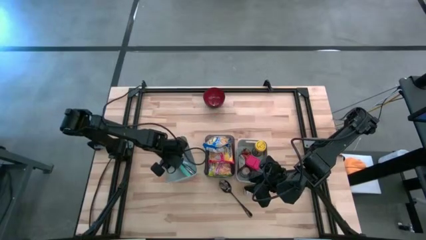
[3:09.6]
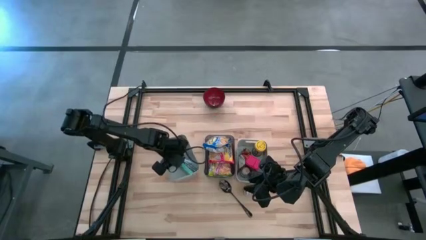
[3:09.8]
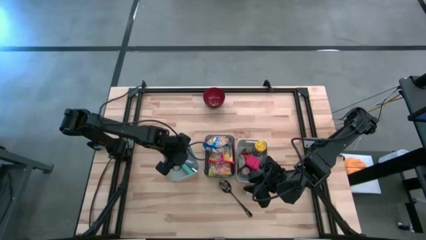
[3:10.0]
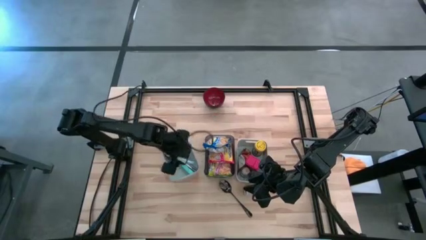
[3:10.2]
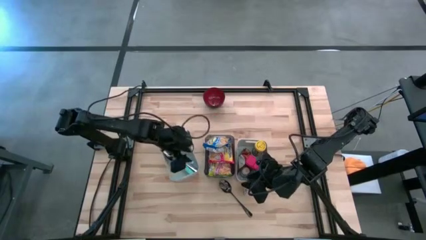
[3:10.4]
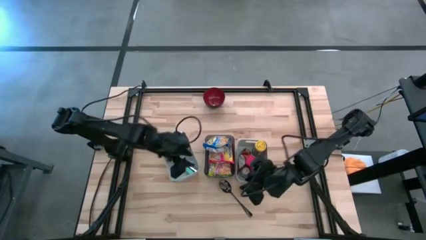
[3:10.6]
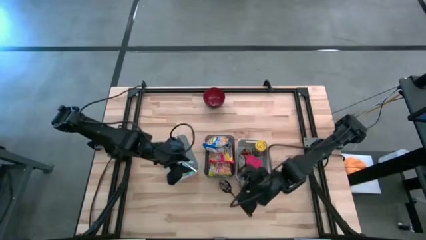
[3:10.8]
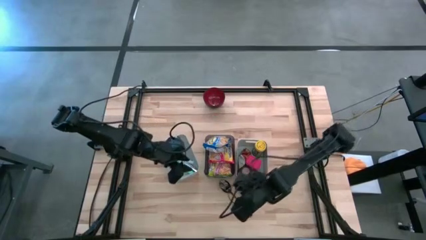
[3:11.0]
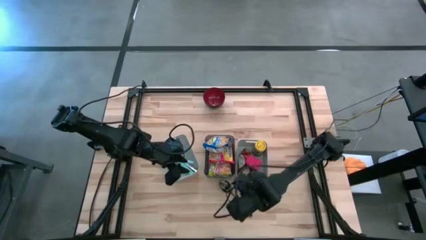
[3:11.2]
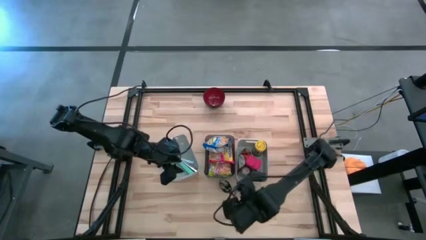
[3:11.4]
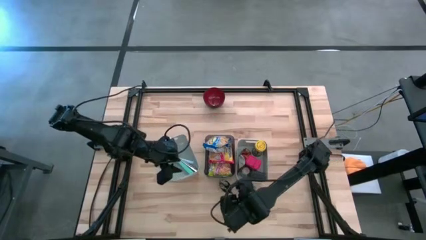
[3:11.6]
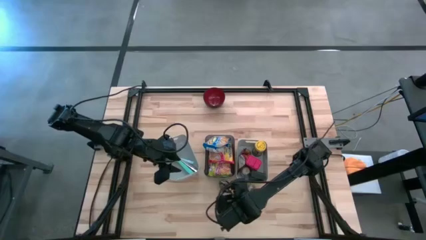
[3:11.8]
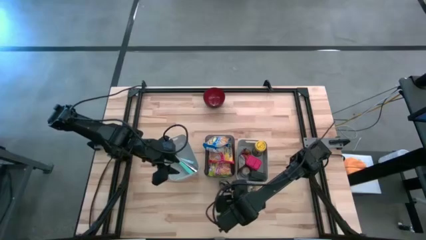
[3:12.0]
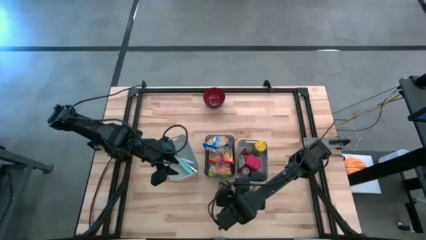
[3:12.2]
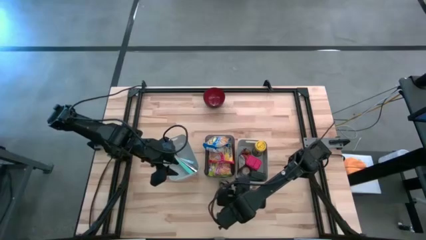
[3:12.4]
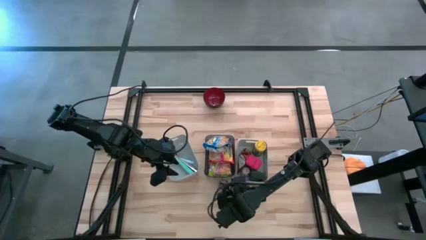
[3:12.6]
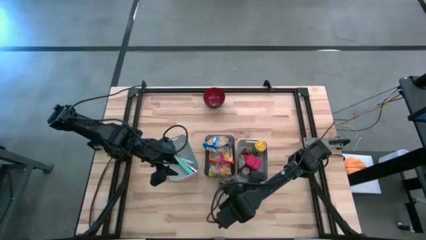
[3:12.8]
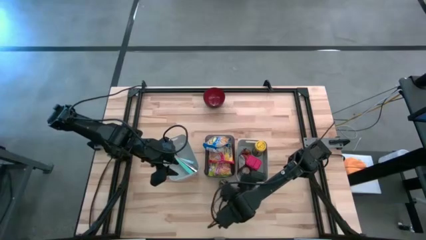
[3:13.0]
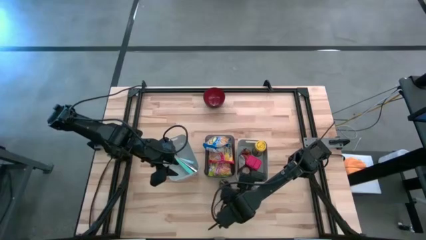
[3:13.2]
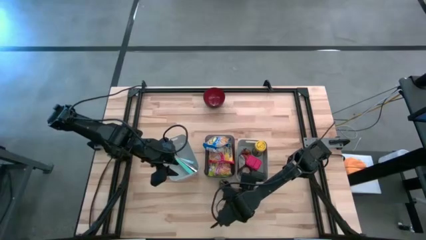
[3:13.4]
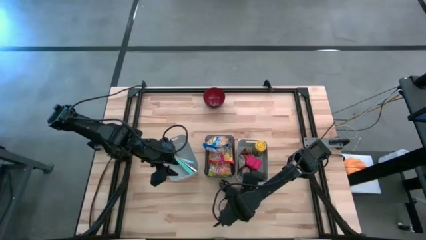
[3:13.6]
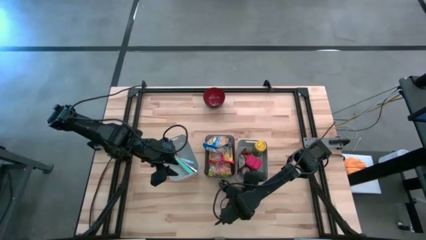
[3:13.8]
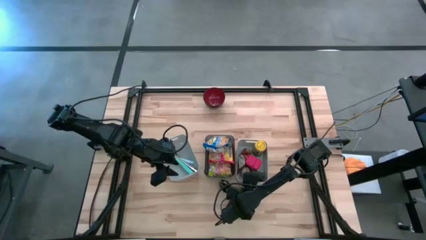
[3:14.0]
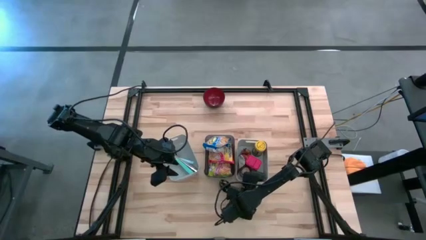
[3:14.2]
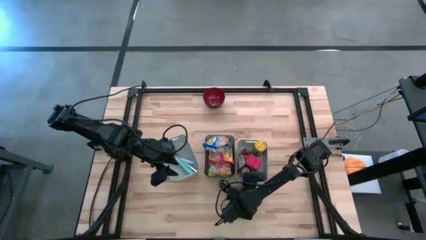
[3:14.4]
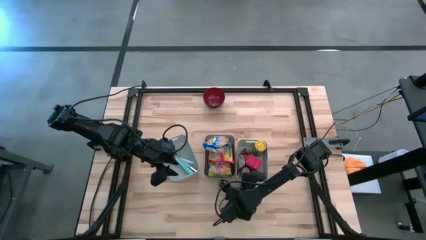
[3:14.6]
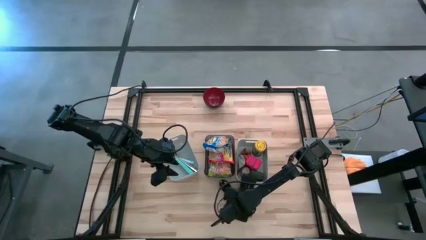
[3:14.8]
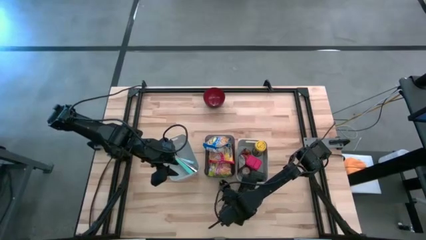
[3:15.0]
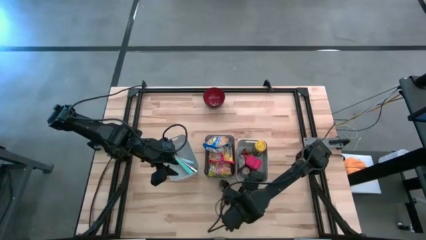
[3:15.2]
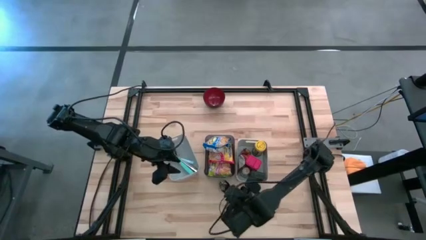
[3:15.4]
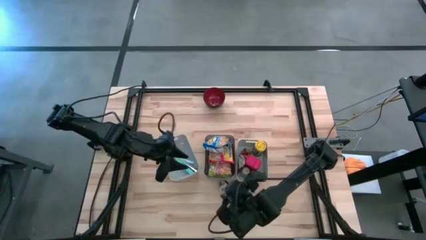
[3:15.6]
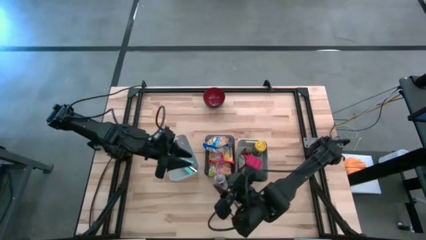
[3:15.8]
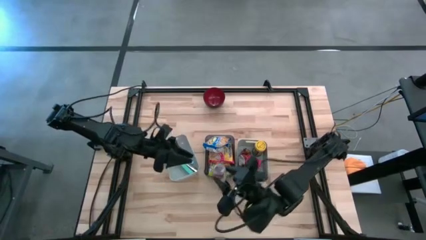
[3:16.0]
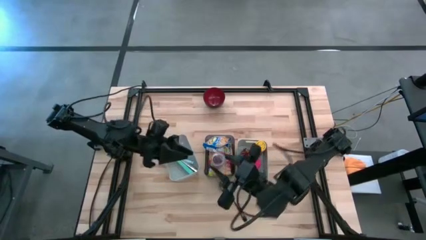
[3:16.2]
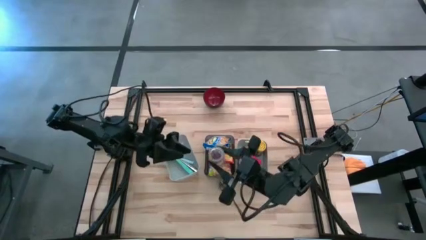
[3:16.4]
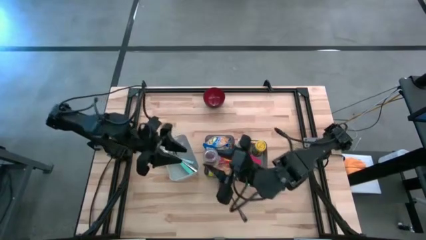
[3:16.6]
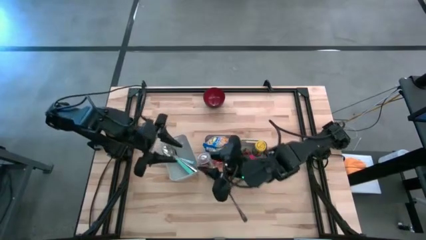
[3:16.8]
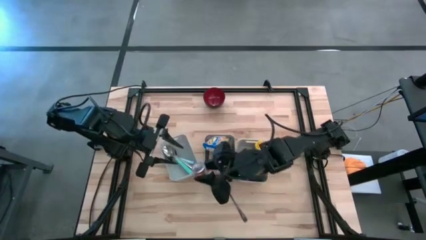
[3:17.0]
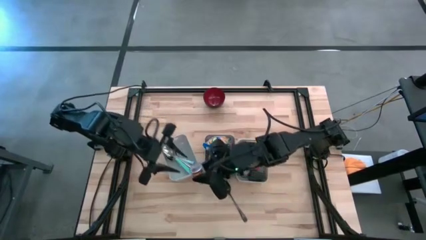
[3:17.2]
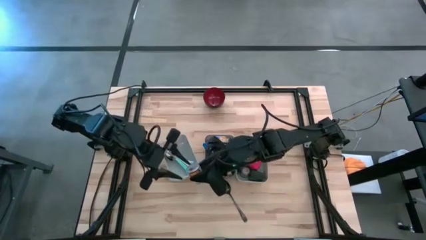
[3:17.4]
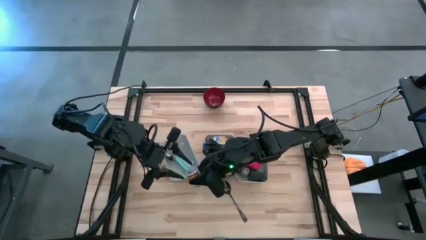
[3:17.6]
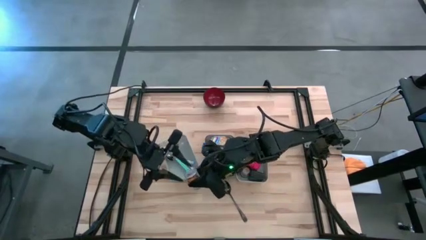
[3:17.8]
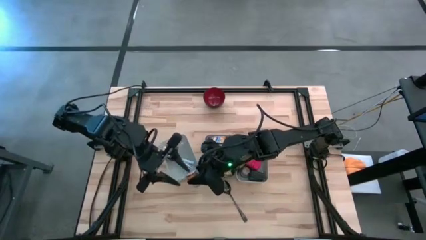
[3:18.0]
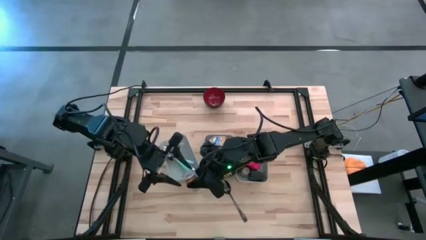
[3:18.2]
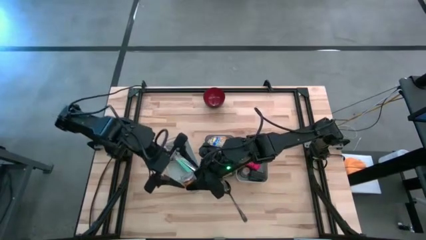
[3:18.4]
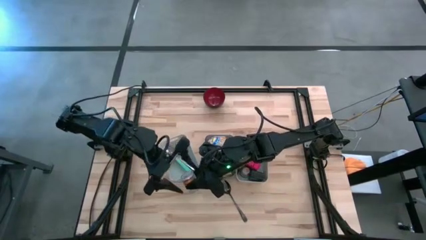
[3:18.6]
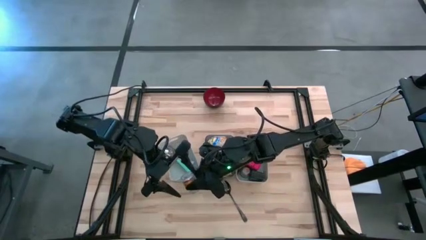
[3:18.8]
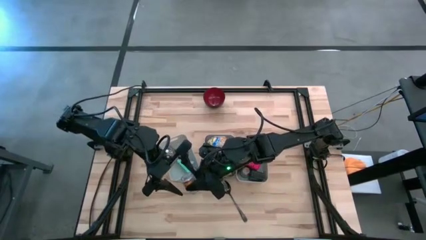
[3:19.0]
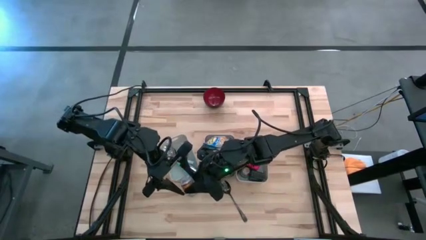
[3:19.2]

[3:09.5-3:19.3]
Put the brown seasoning into the right gray bin

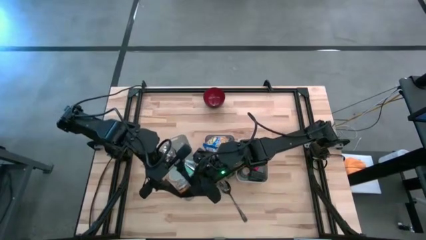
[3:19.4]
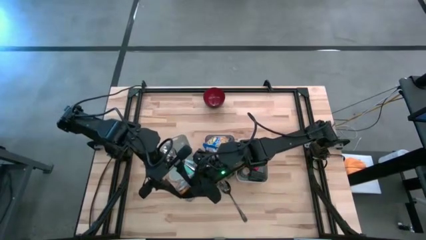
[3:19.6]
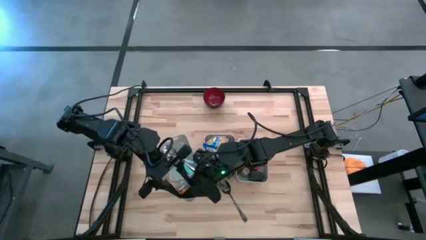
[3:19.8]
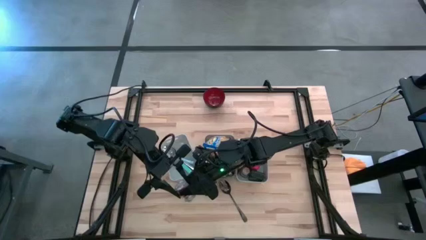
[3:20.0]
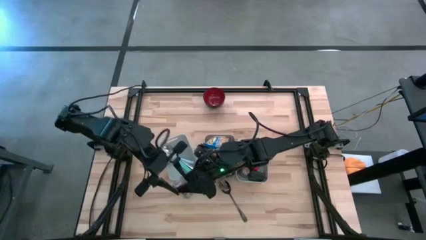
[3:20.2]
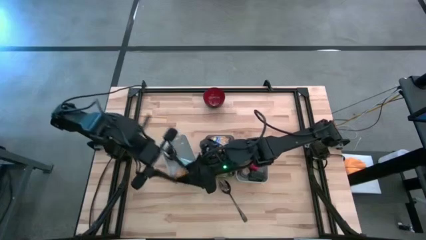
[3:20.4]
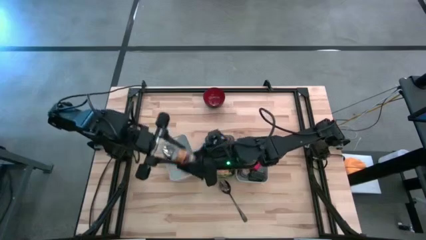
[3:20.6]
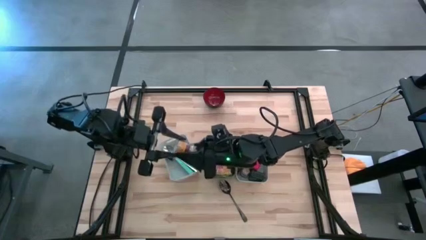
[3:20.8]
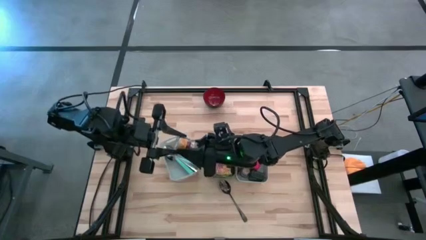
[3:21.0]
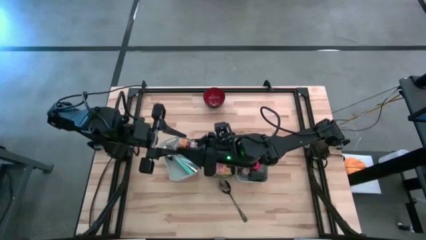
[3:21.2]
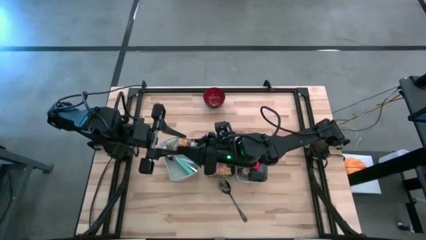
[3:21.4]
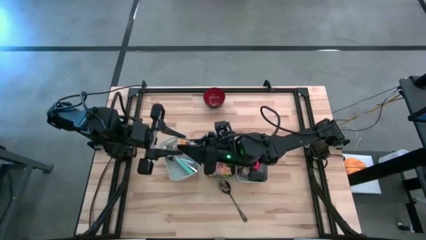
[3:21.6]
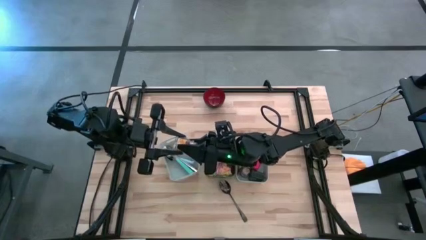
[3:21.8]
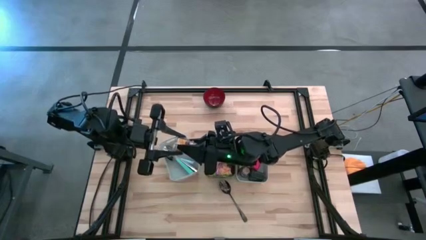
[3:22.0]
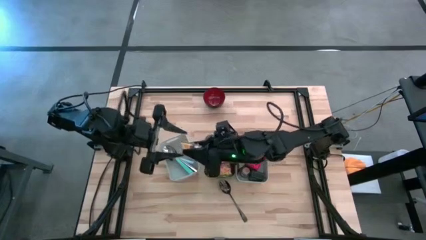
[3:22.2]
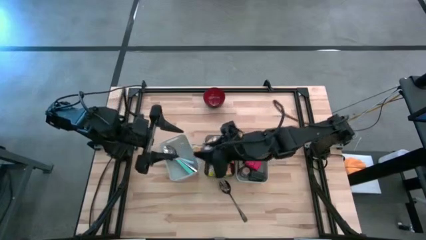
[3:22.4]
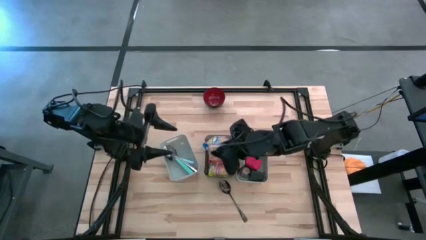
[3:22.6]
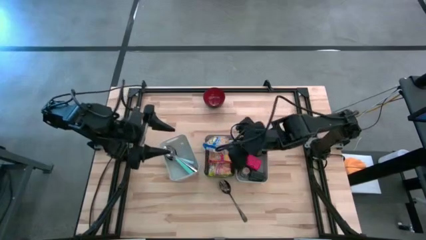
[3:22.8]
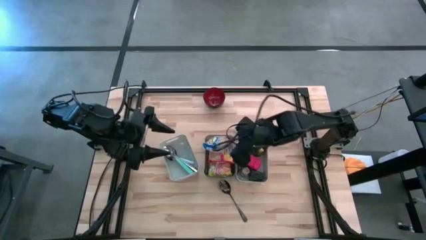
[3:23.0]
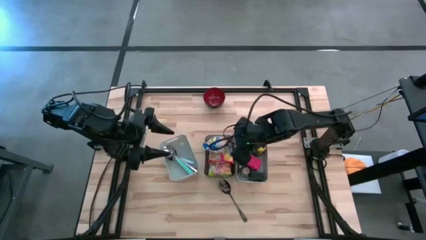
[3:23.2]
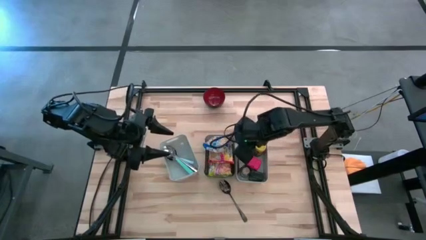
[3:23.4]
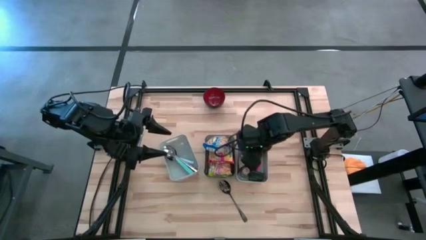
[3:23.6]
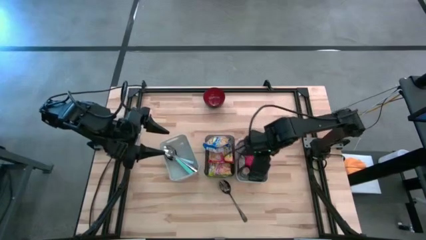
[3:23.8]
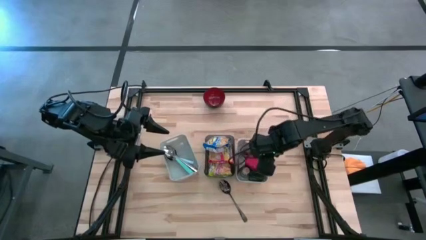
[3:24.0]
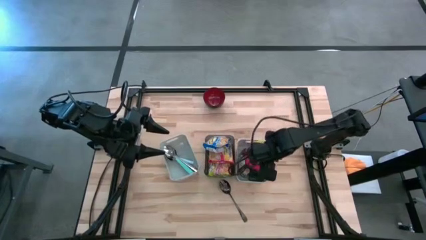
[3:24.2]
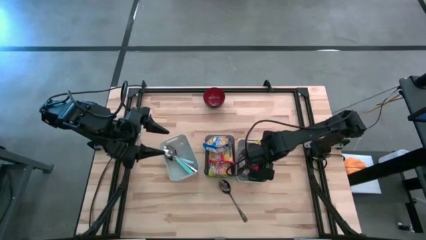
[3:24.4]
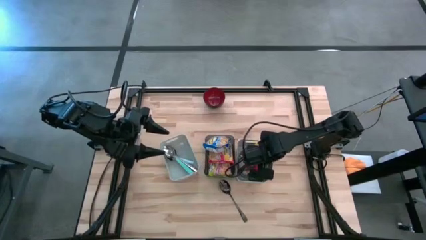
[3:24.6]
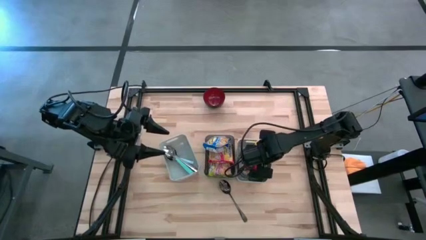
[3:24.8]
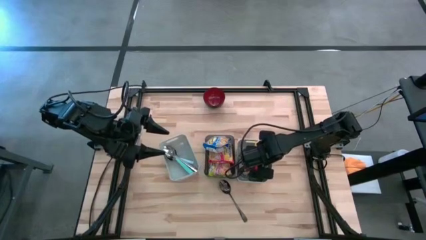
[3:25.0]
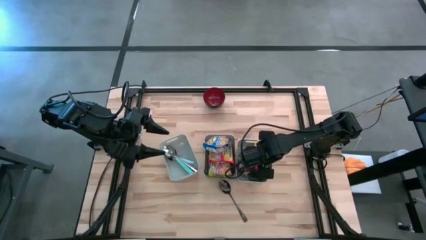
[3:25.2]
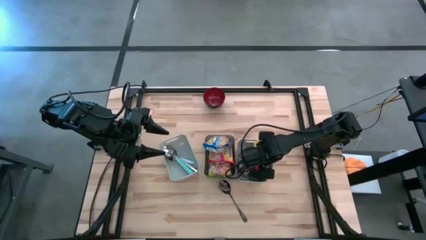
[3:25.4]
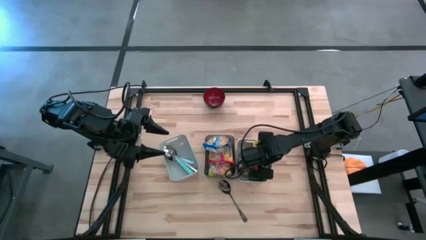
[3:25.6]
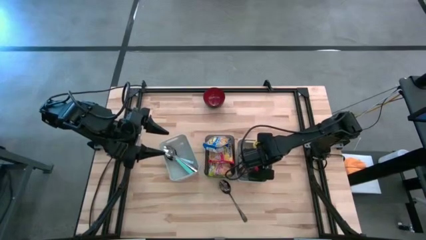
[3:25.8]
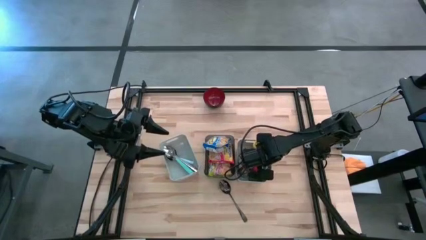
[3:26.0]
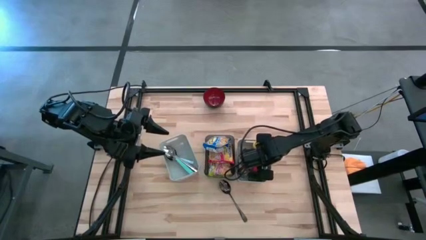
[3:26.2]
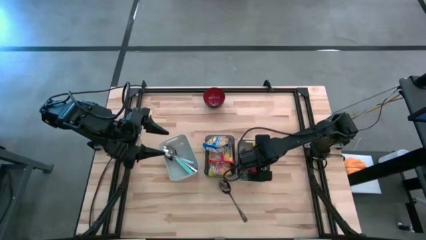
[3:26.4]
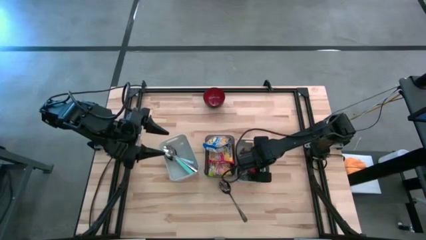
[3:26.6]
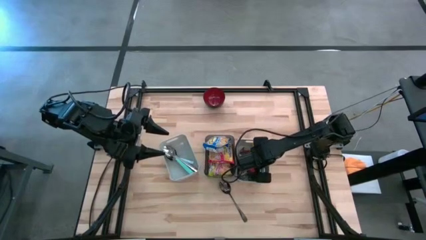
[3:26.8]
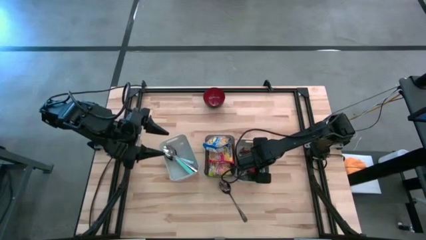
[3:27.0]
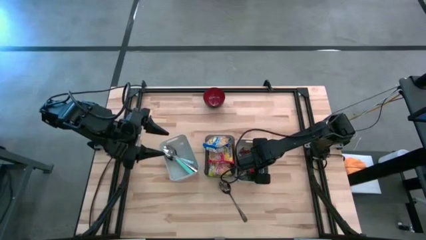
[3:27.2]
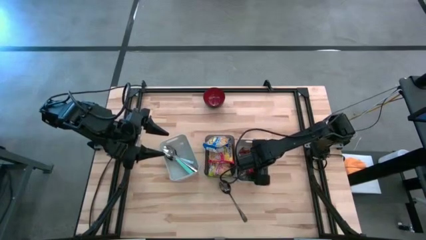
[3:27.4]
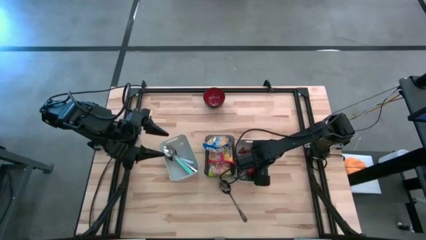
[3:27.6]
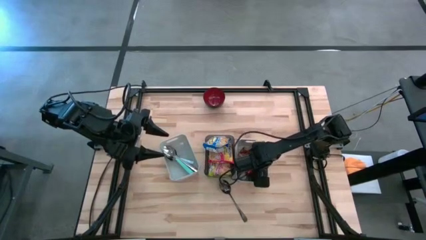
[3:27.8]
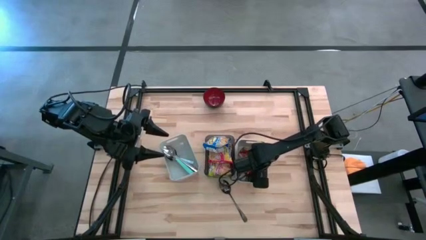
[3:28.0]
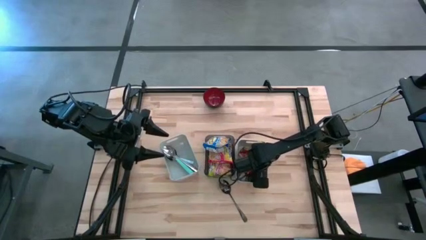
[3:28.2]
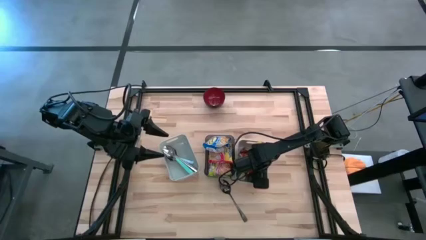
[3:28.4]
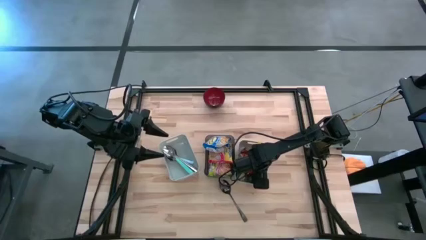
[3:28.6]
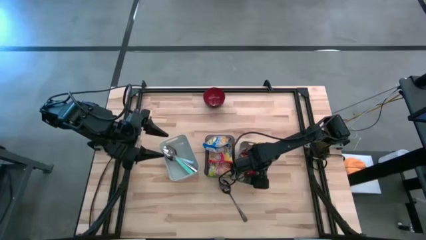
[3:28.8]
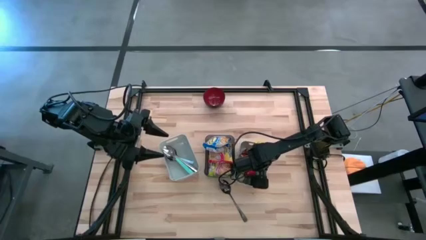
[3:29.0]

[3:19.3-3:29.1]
Put the brown seasoning into the right gray bin
